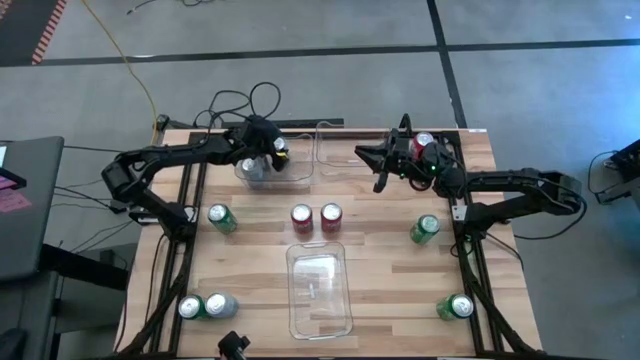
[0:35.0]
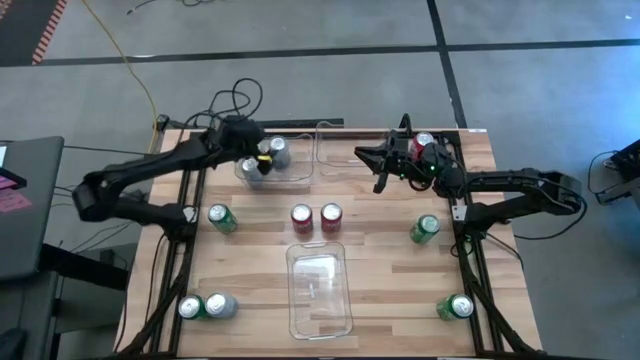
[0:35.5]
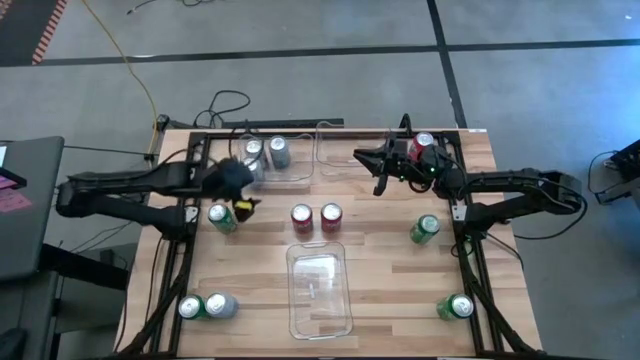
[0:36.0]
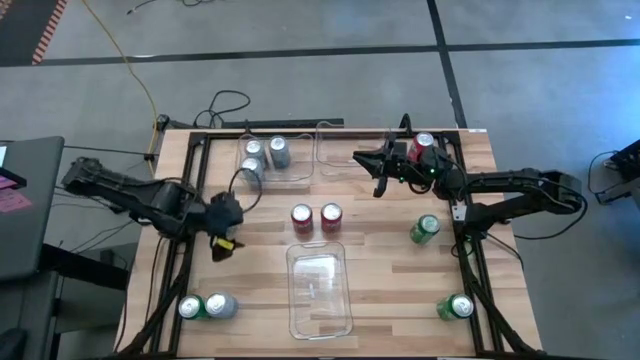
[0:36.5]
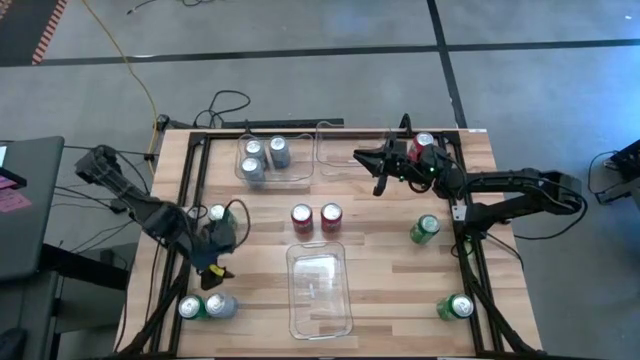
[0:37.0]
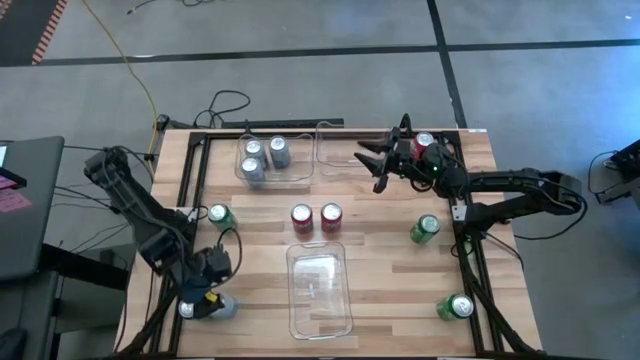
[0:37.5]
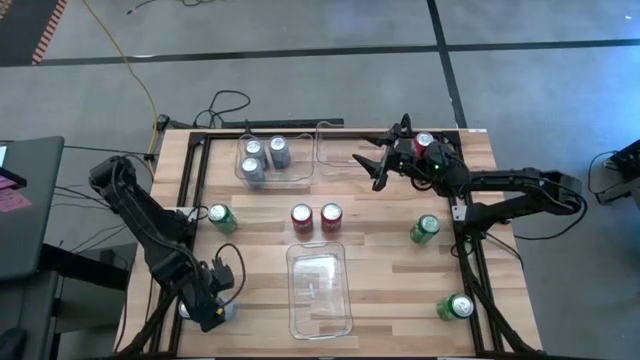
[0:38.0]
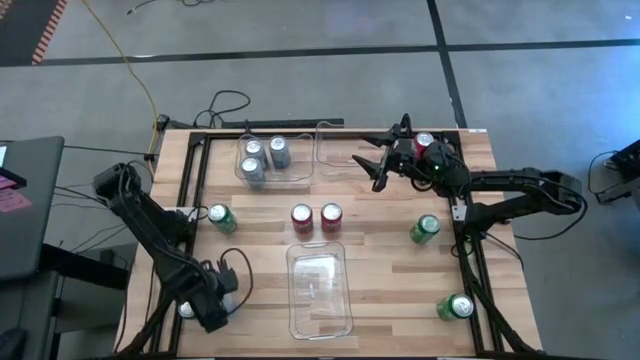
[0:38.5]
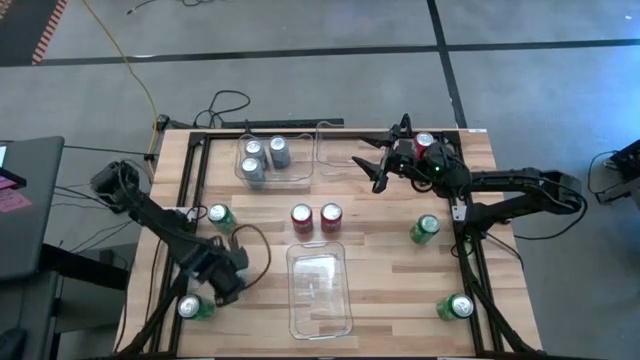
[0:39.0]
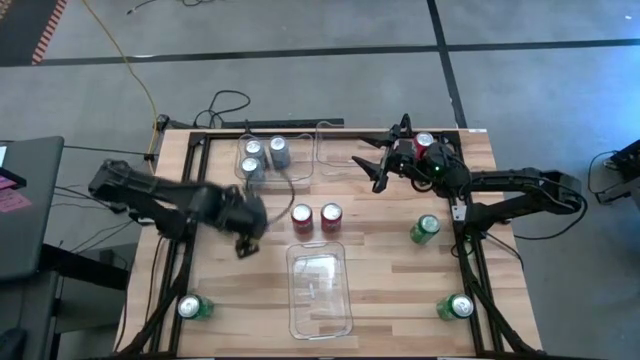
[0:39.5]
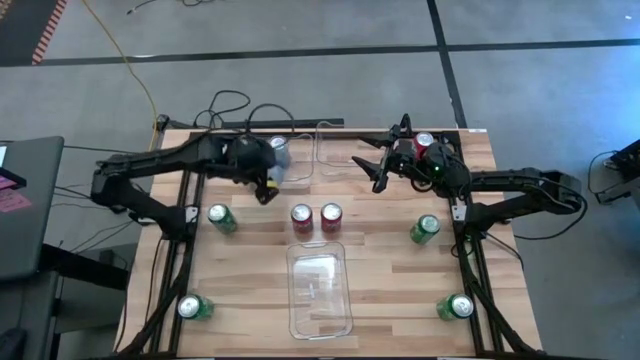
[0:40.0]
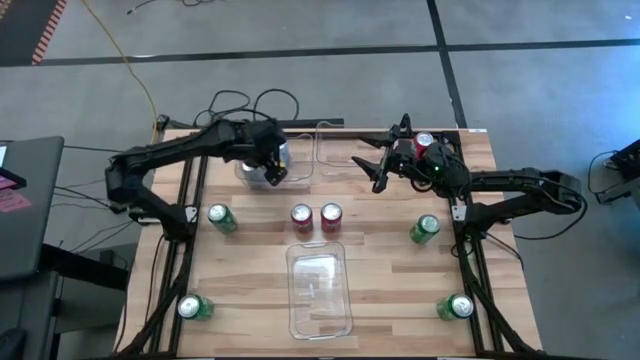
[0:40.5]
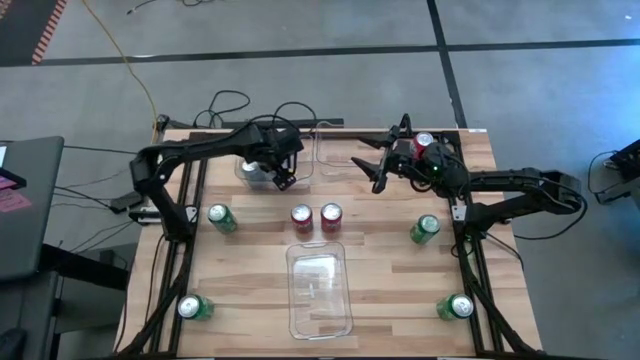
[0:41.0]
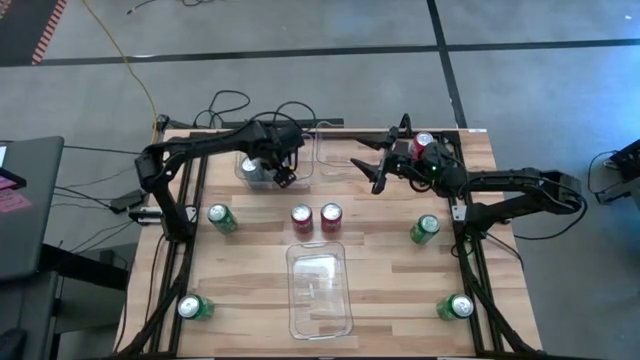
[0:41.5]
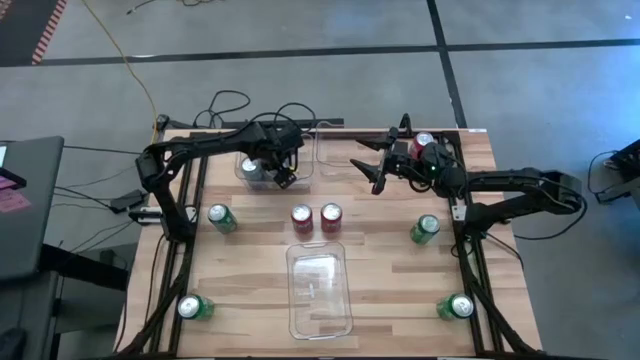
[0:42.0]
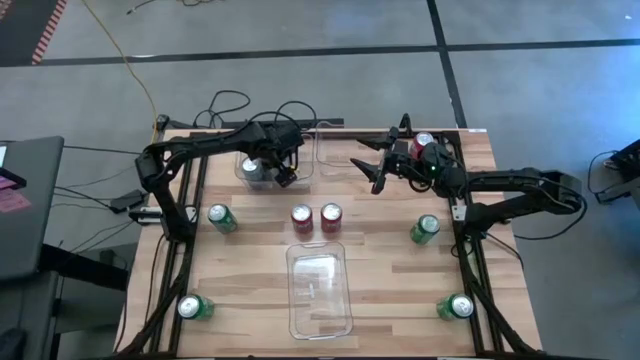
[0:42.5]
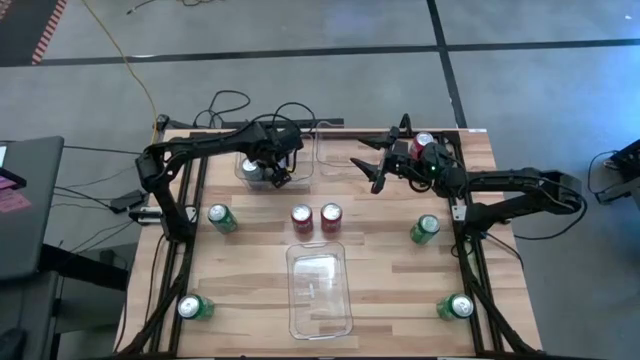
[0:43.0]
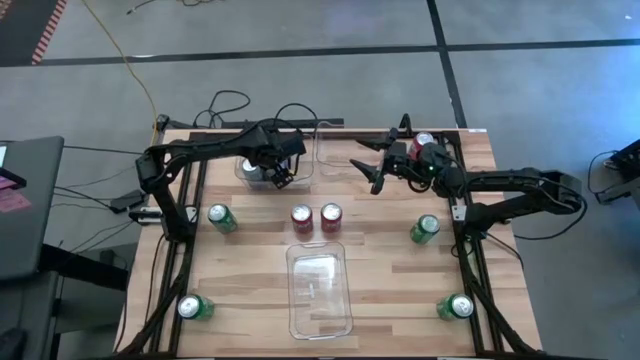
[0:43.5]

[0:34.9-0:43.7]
Task: Sort soda cans
Put the white and blue soda can into the top left transparent bin

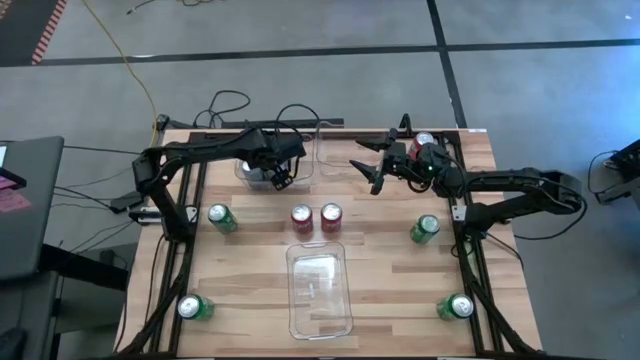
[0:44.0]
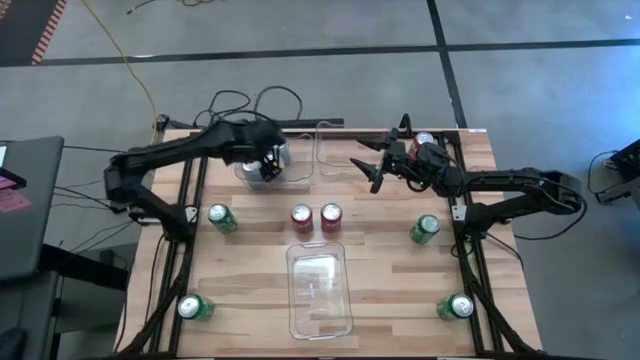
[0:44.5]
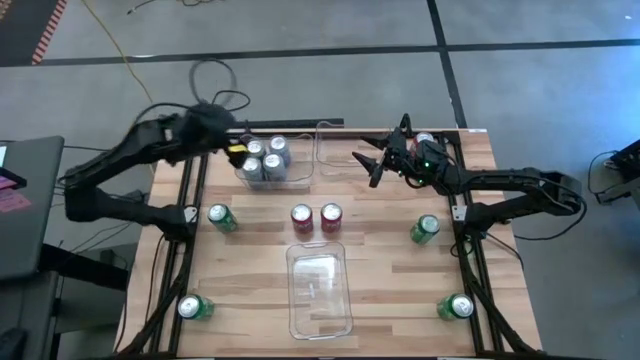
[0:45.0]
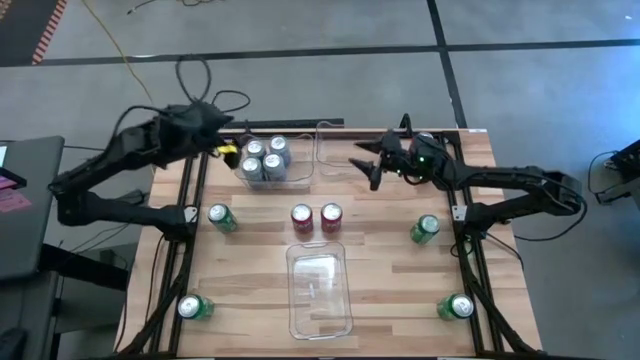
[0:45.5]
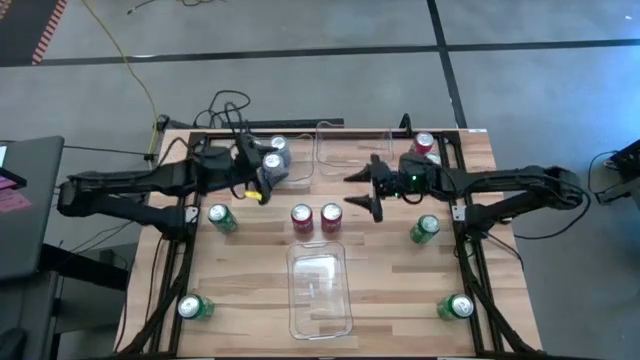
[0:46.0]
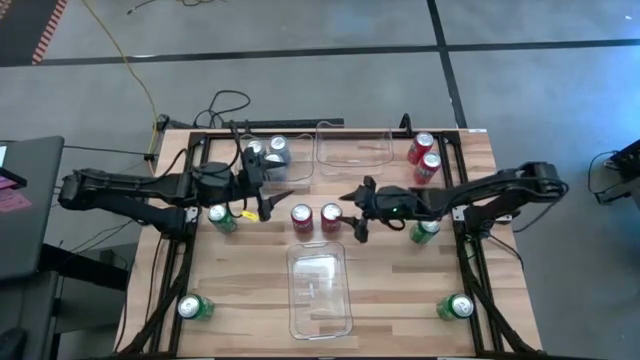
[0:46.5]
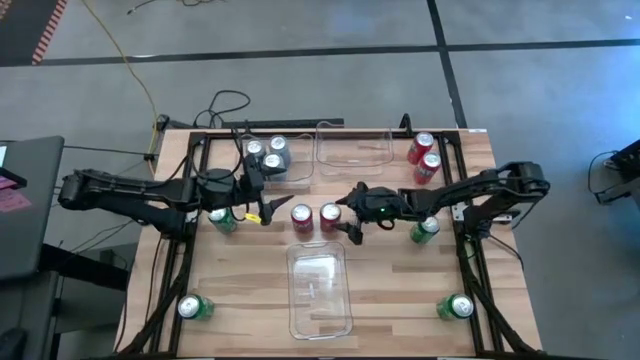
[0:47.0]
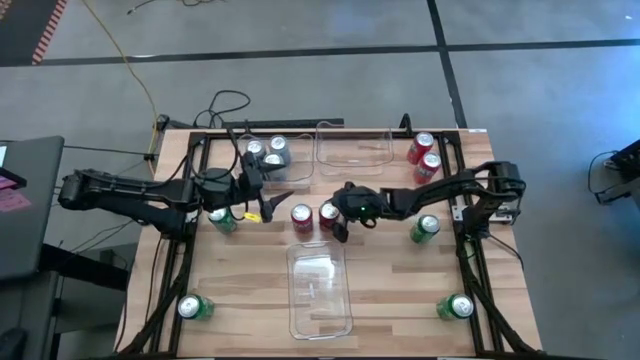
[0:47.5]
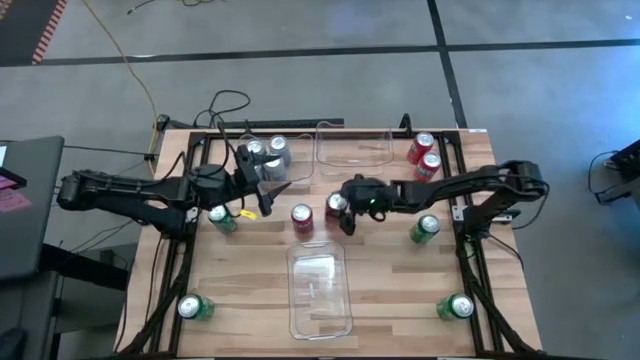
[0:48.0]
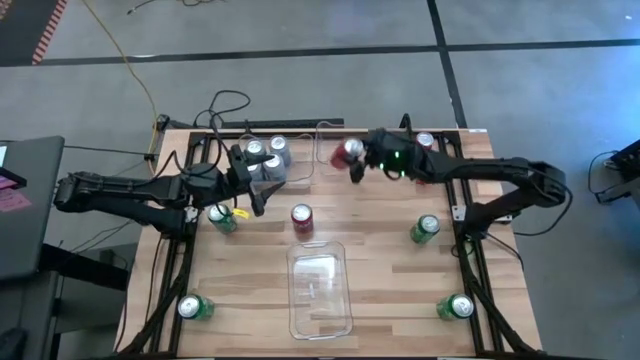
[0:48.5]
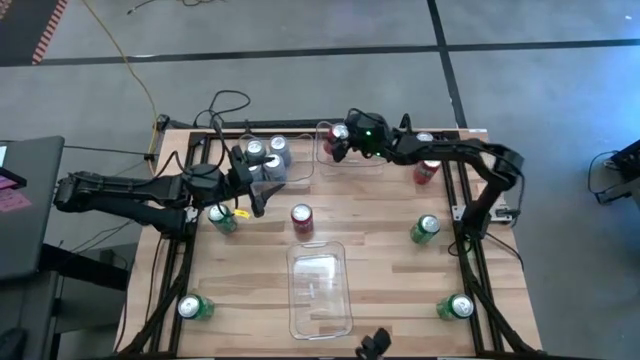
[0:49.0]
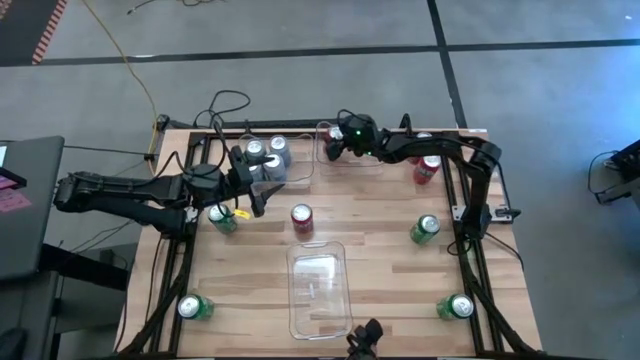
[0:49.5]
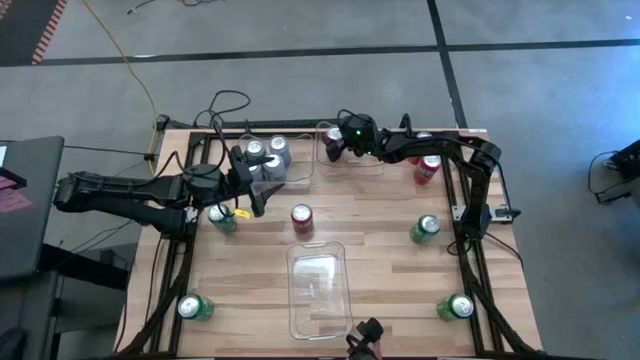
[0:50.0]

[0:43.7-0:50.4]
Put the bottom right red soda can into the top right transparent bin
